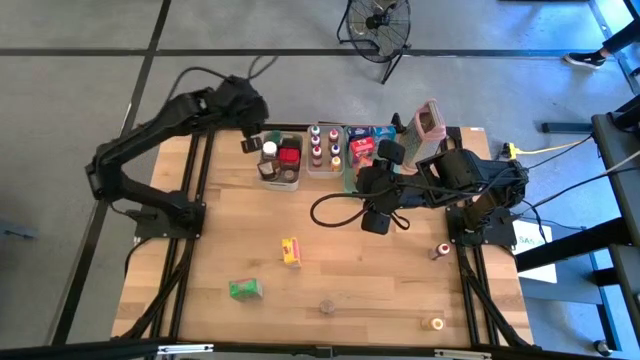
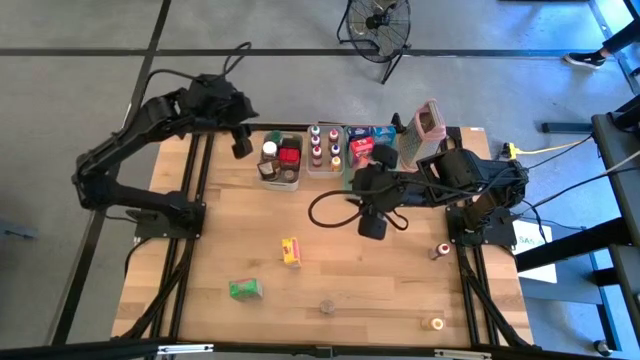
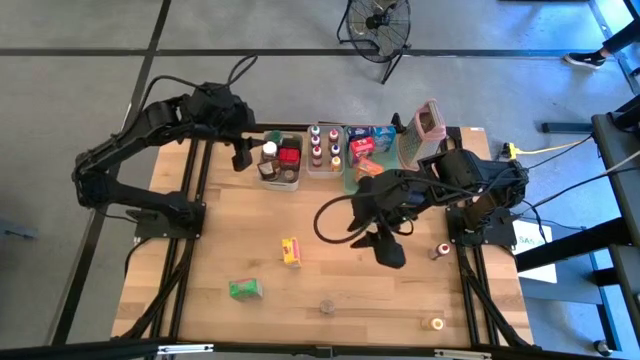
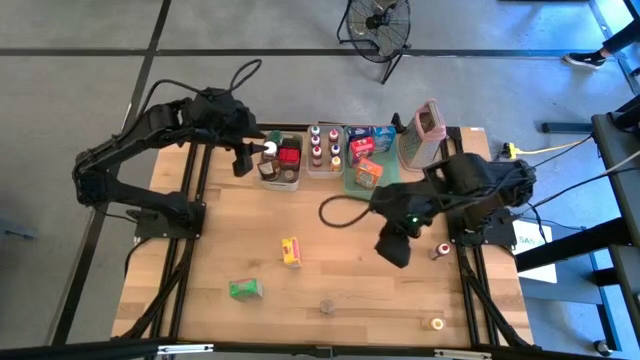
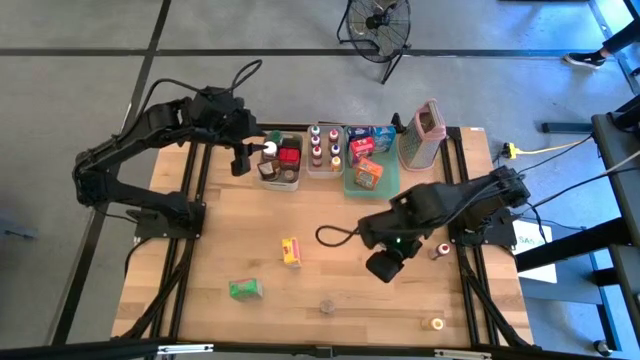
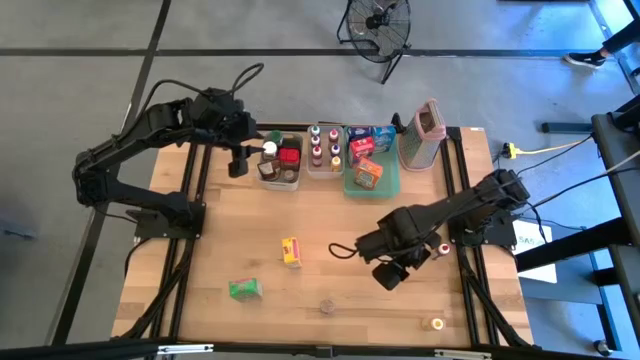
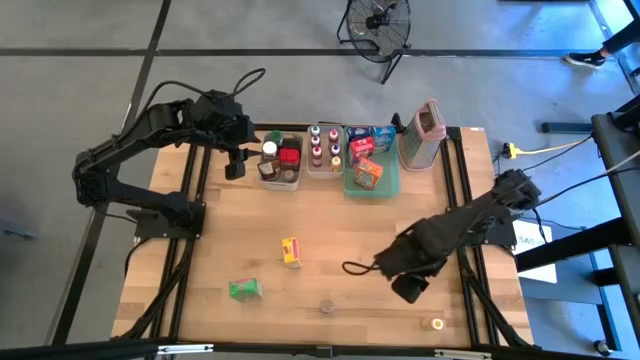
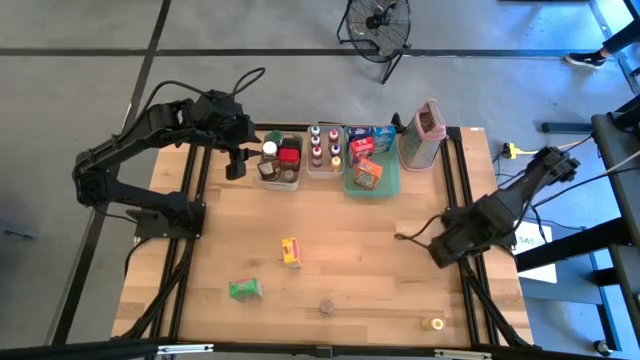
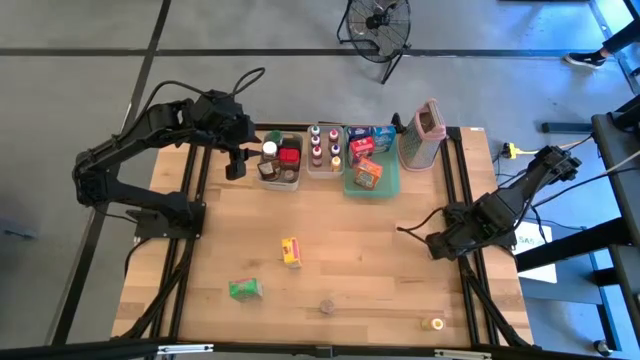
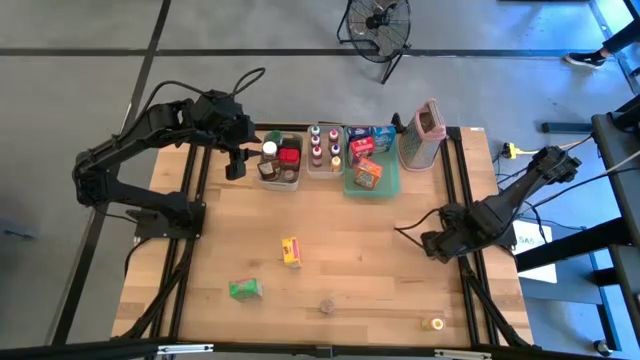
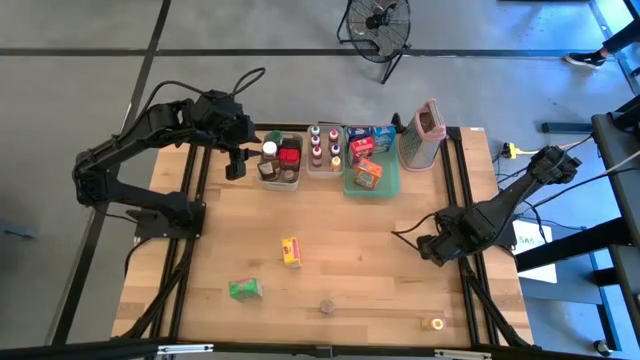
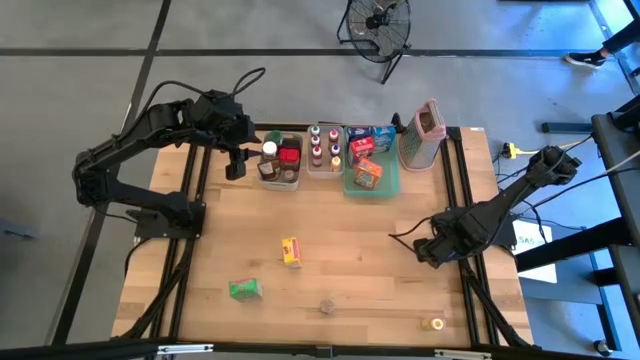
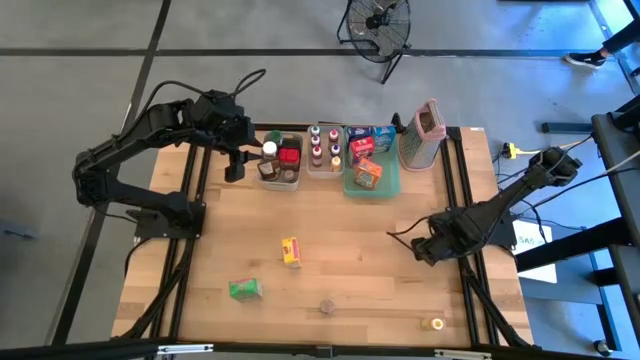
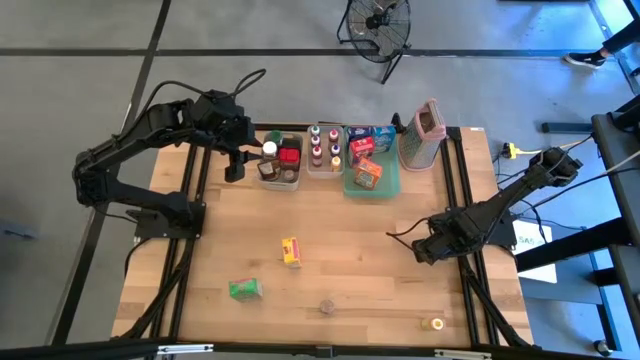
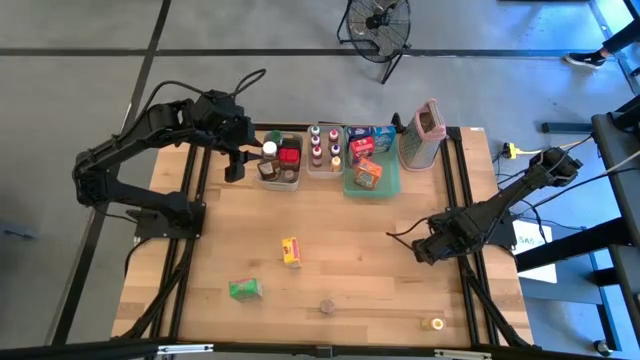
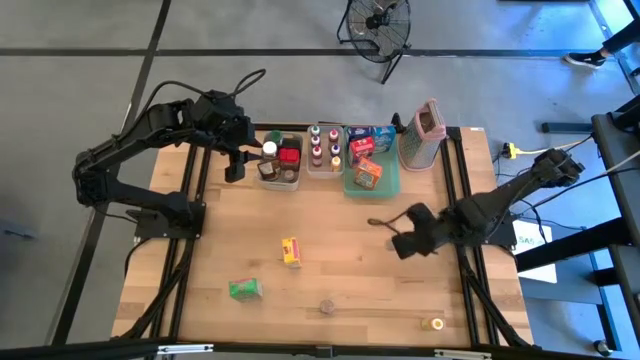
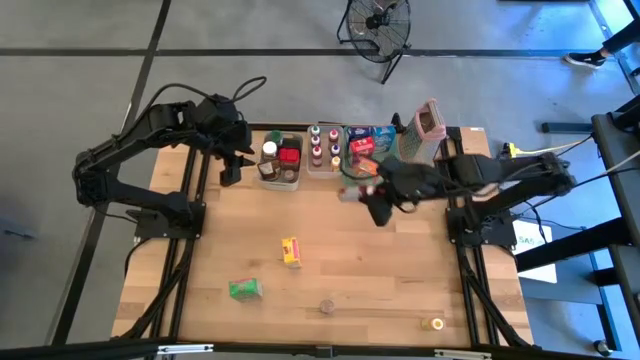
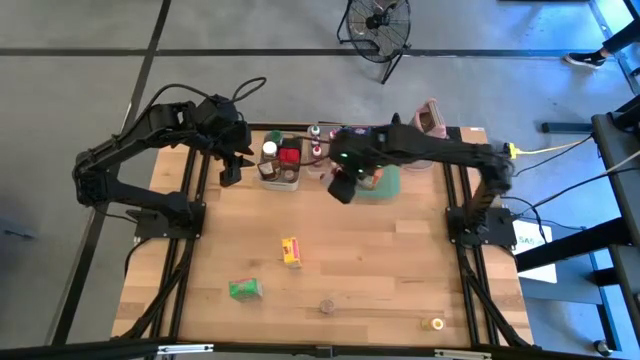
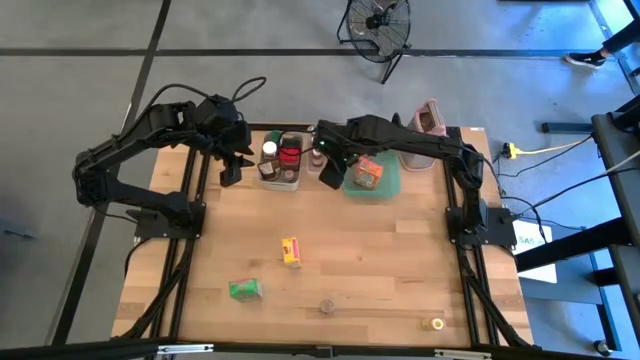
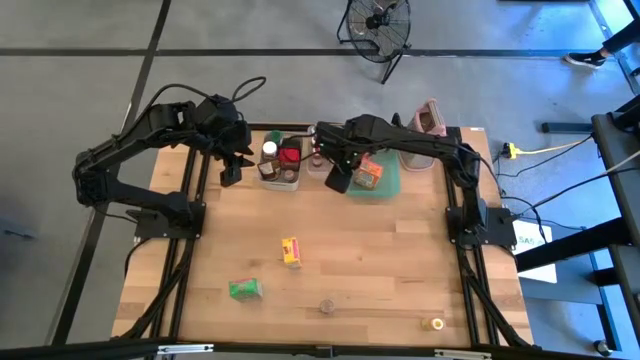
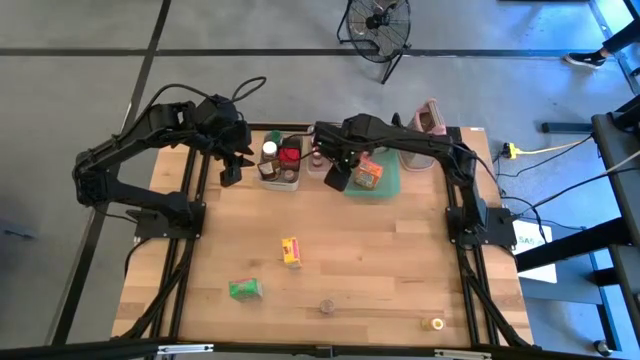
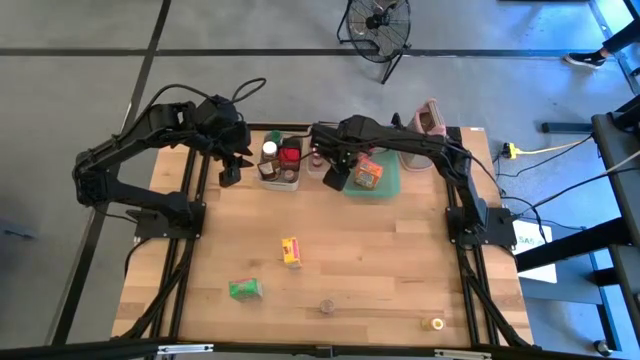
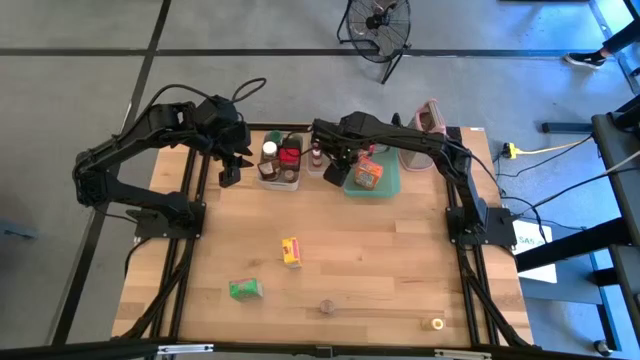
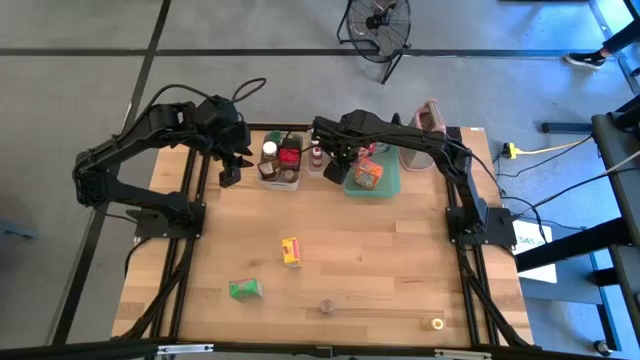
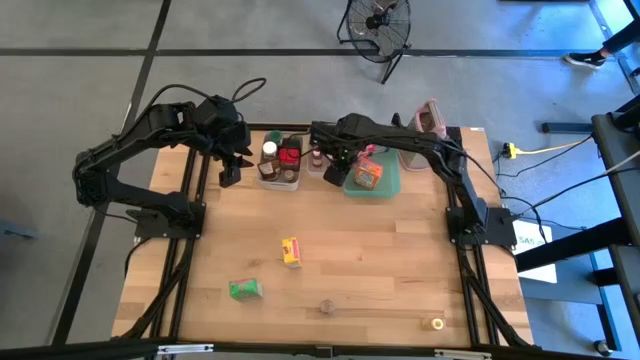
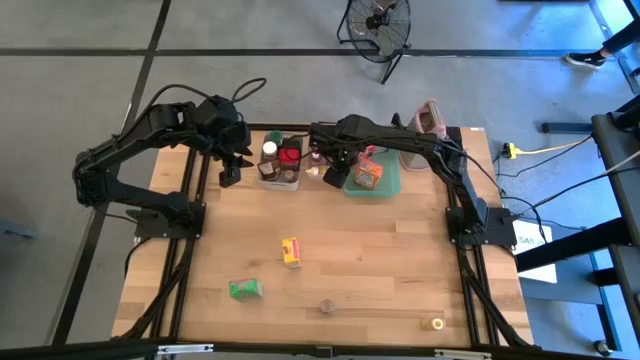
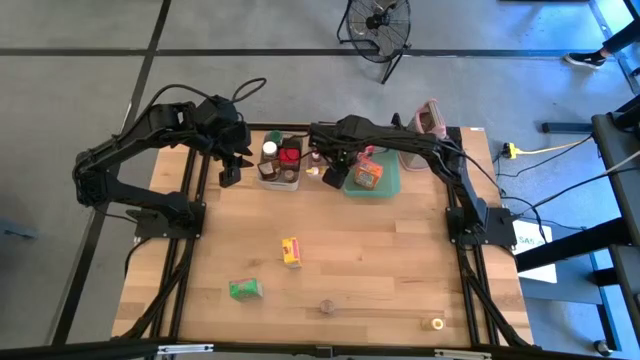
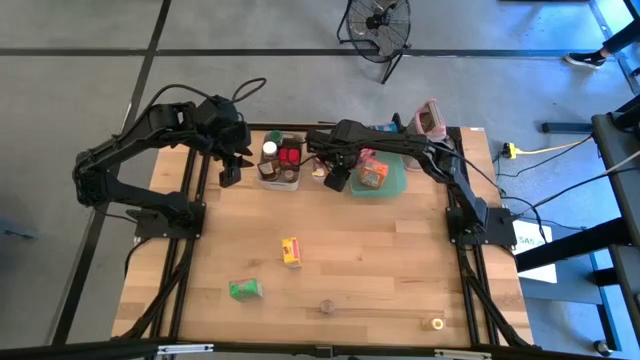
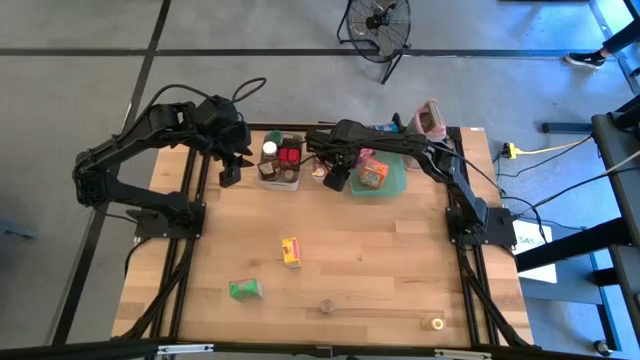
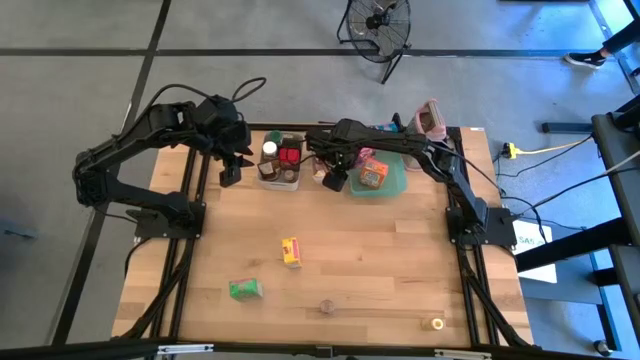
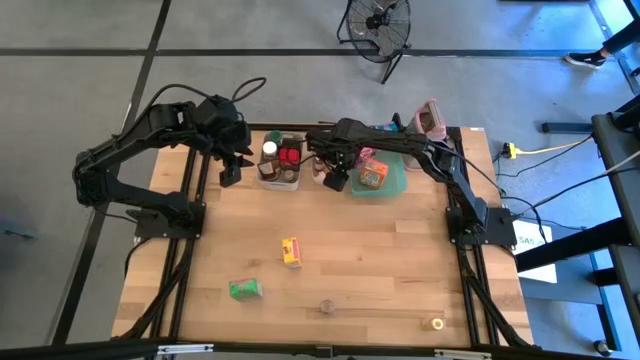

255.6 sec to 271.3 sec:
Task: Pick & Place Kitchen Items
Put the red food coloring bottle into the transparent bin

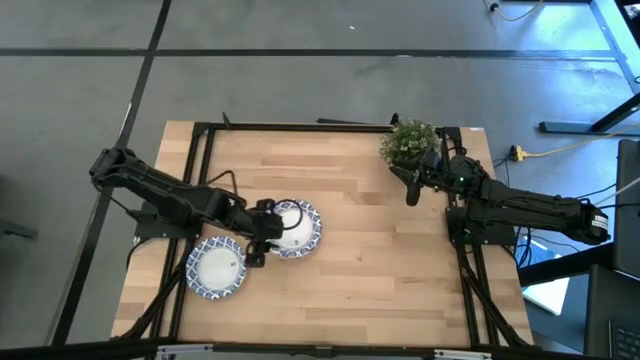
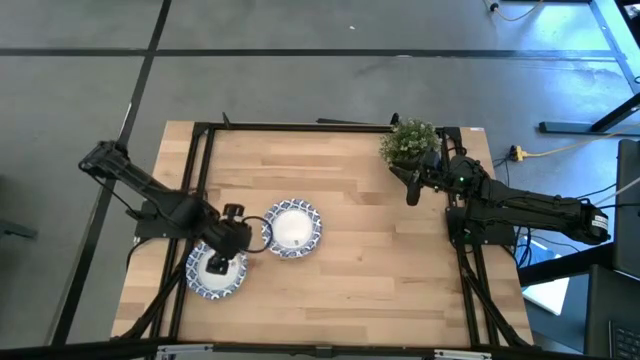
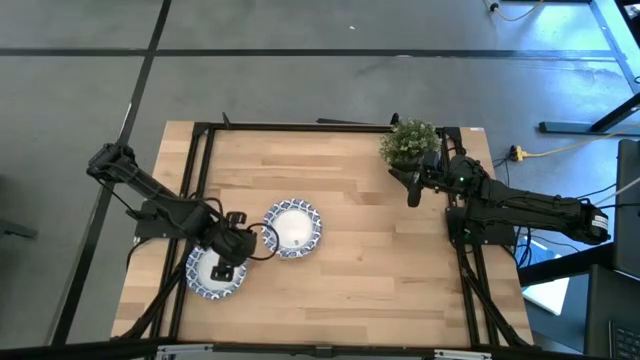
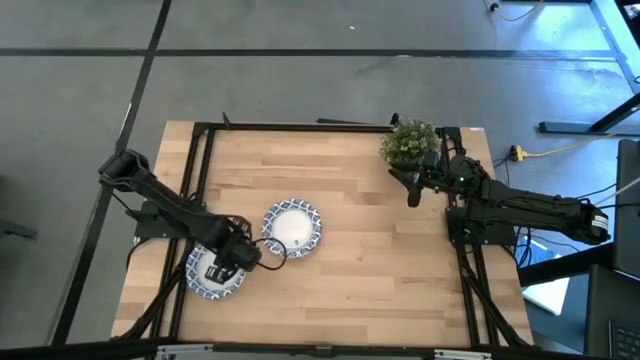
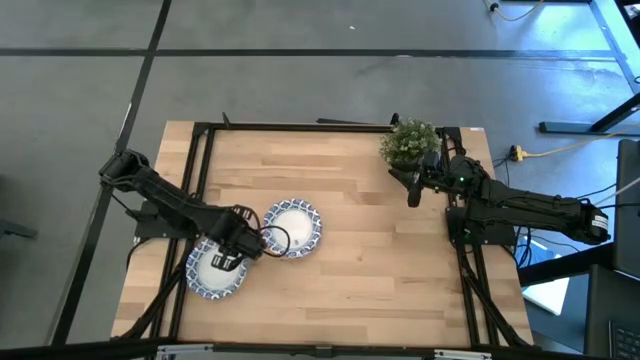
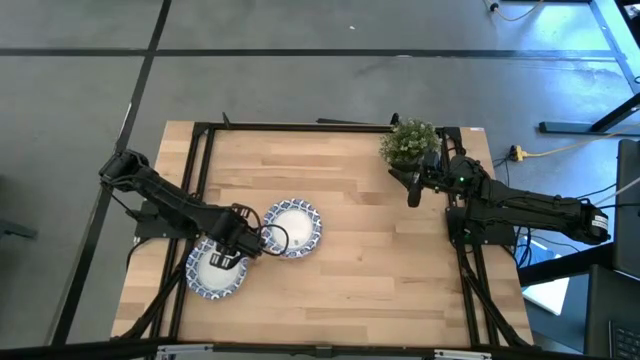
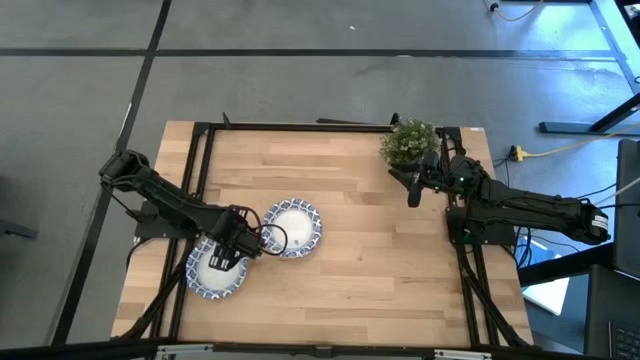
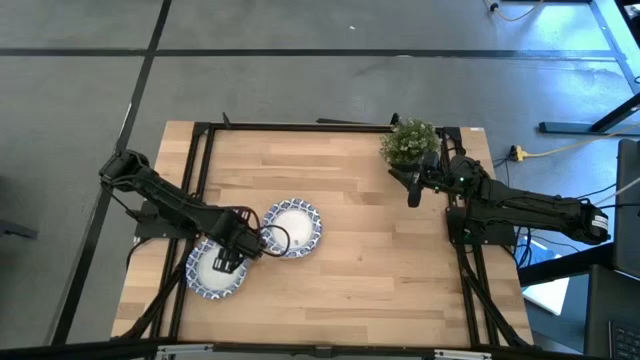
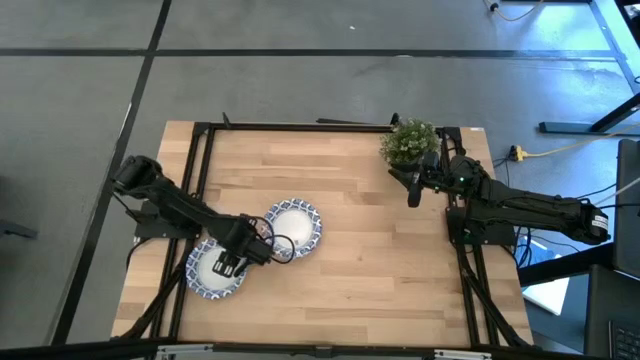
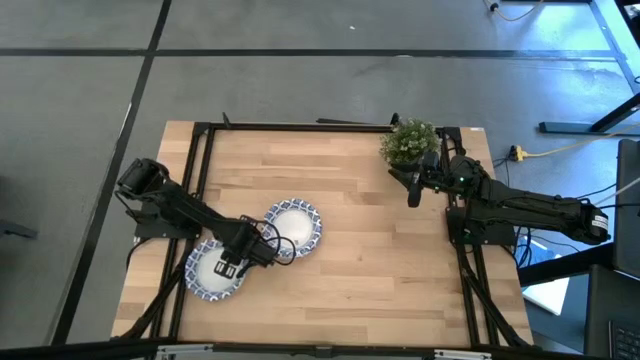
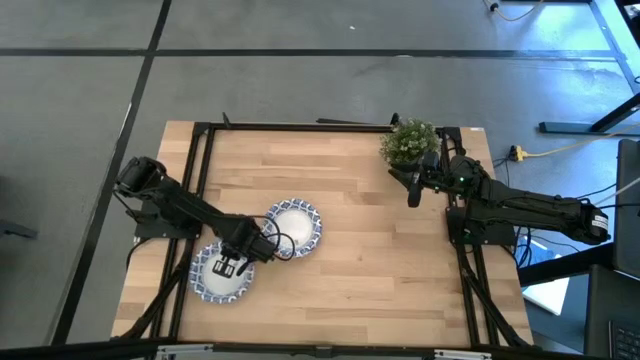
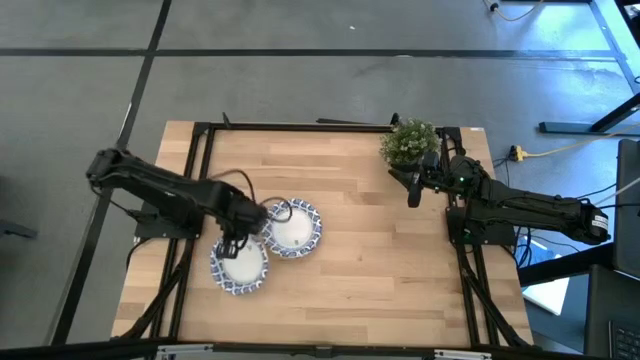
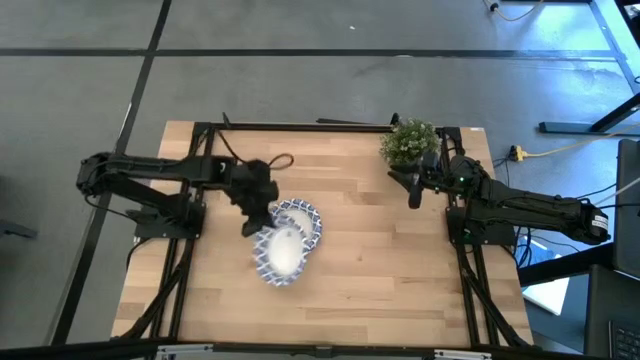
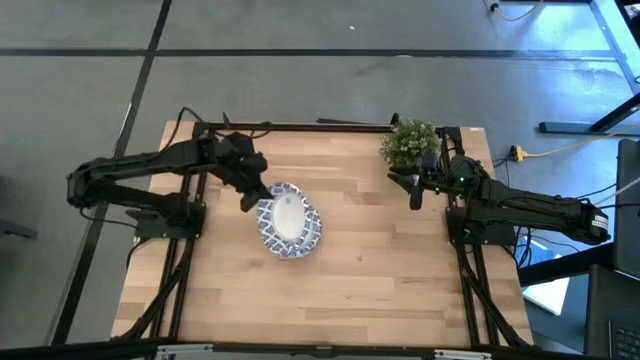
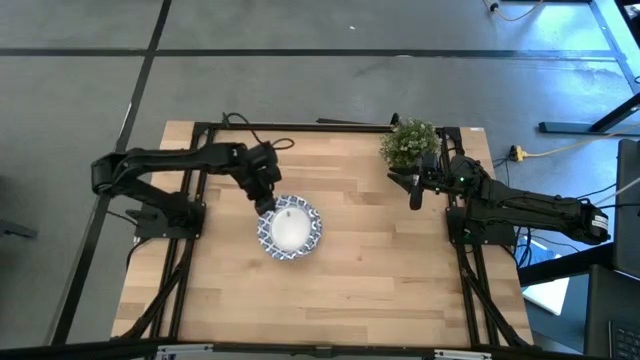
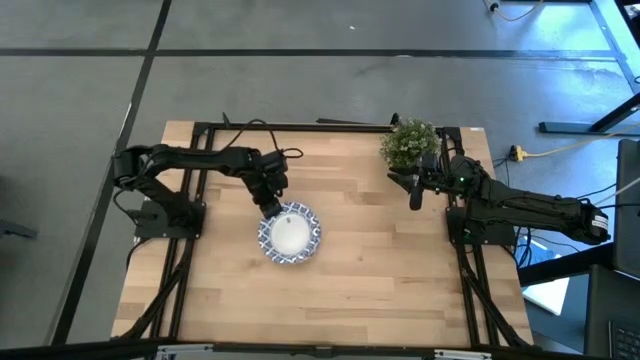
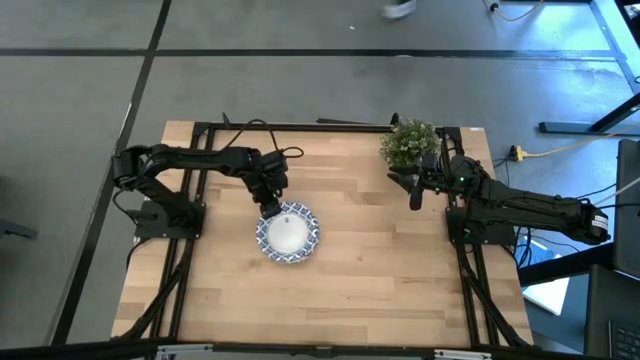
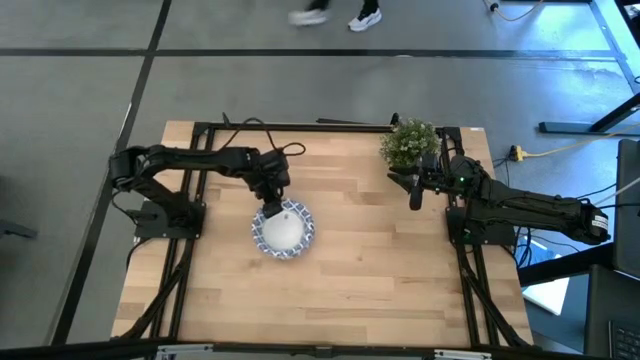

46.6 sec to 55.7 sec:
Task: Nest bowls inside each other
Stack the white patterned bowl on the other white patterned bowls
